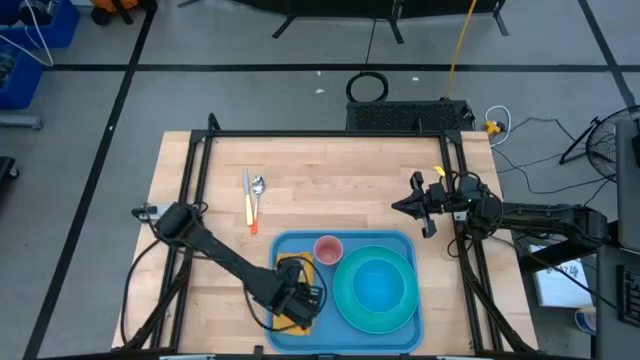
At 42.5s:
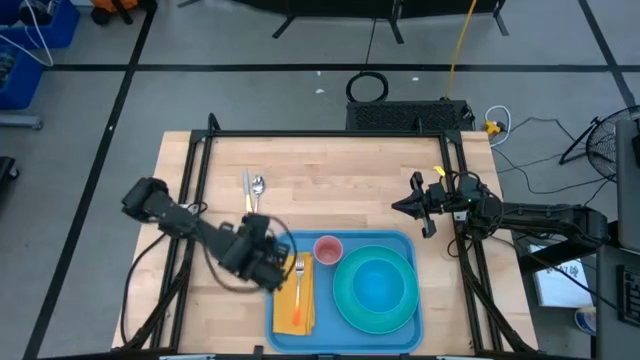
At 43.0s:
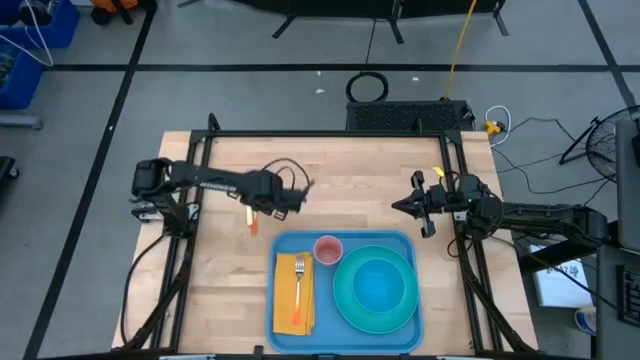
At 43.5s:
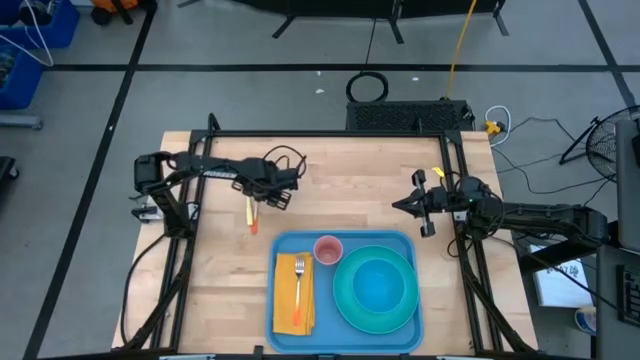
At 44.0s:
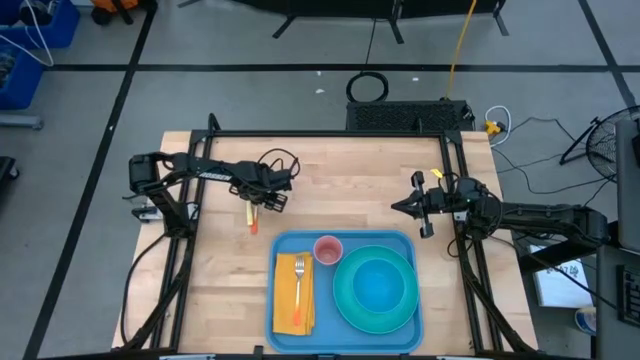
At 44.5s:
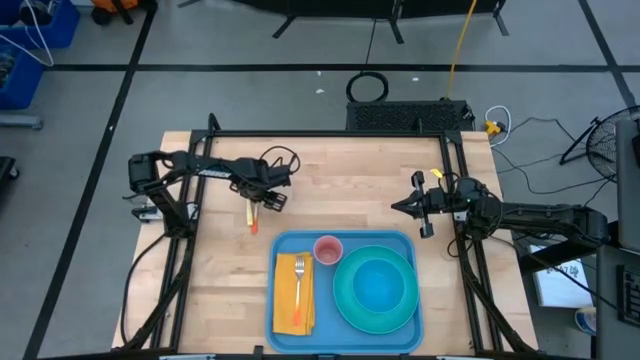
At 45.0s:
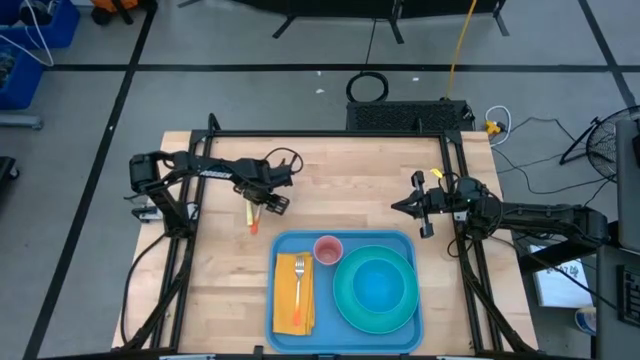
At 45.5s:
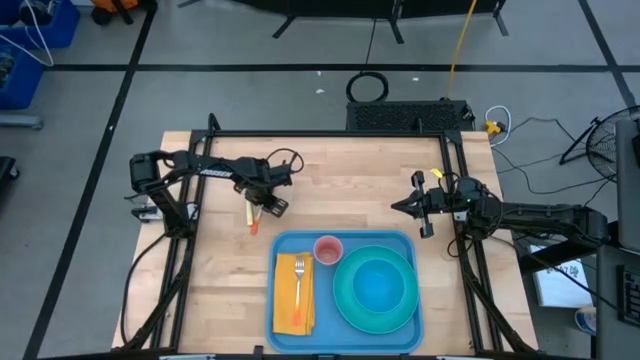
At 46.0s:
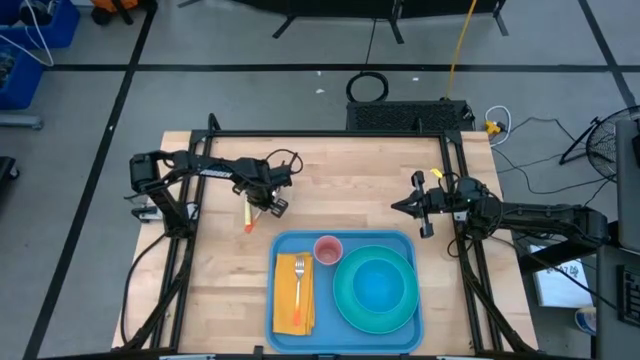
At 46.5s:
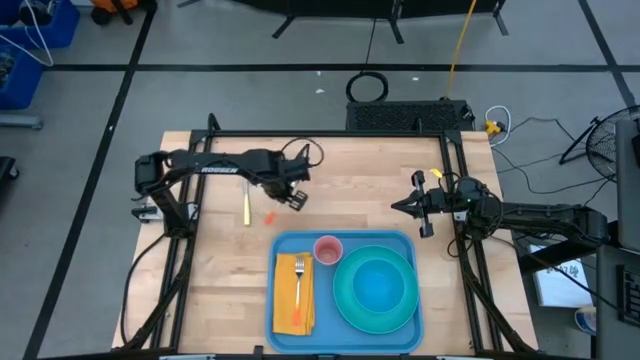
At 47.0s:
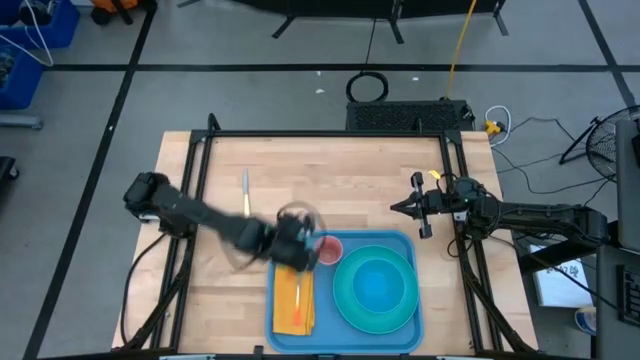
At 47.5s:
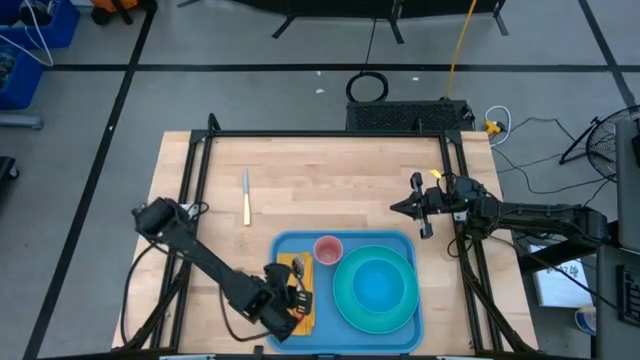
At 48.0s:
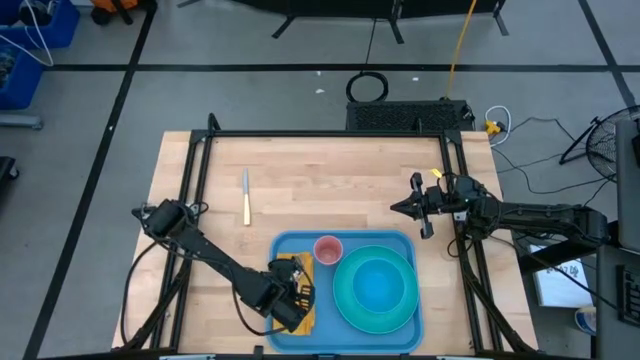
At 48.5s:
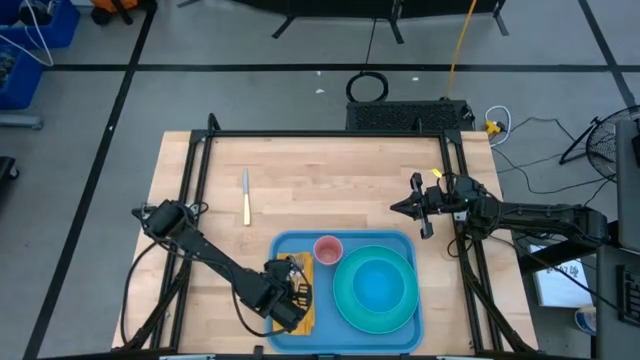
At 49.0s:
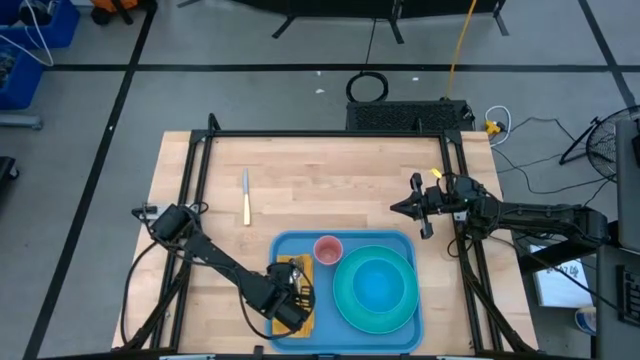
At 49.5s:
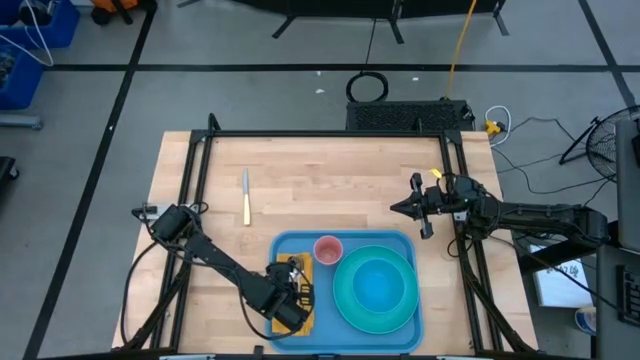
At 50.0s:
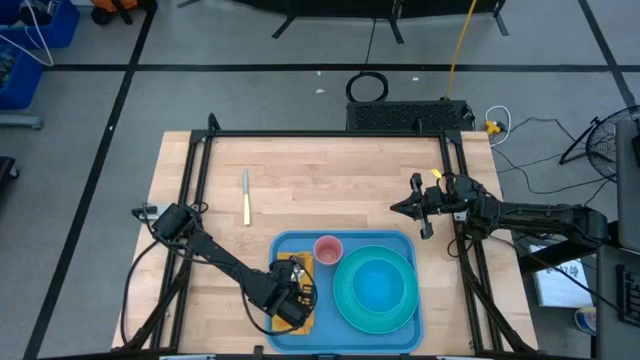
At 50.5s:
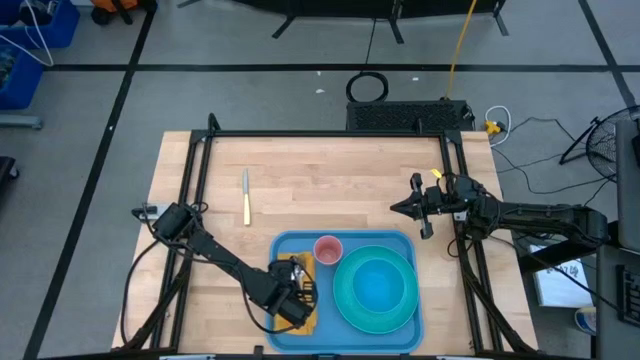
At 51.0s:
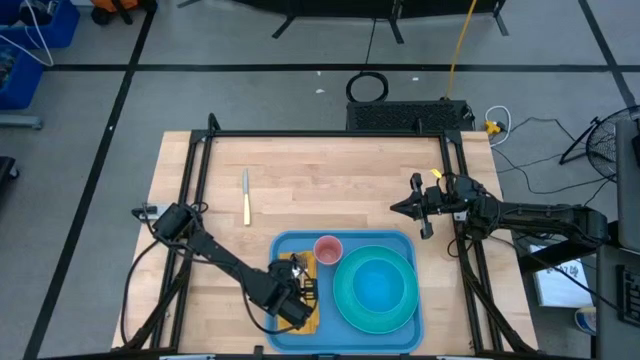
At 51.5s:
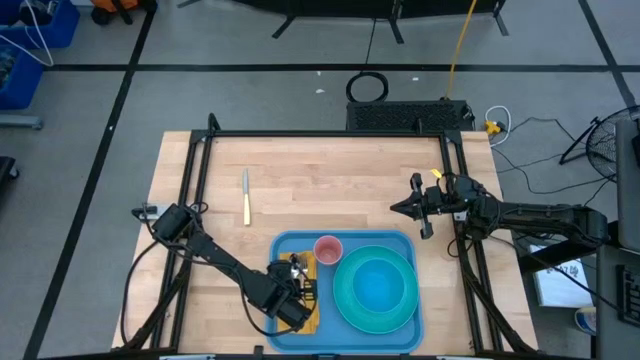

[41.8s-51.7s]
Task: Set up tray
Put the orange spoon on the yellow napkin to the left of the orange fork on the blue tray

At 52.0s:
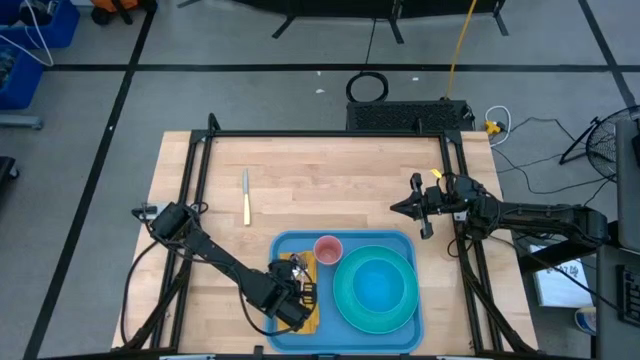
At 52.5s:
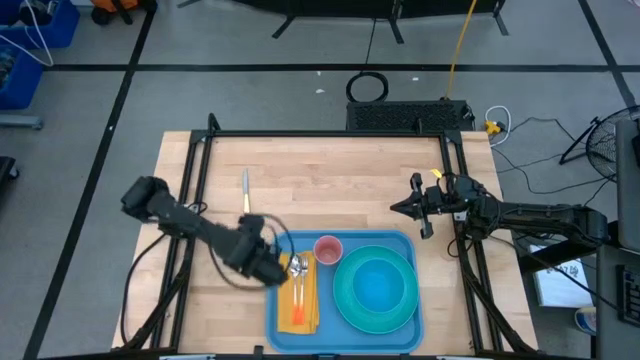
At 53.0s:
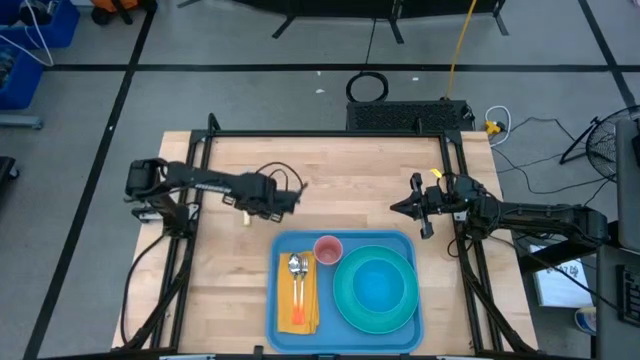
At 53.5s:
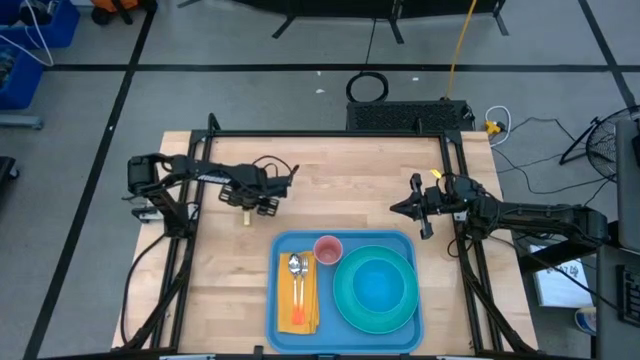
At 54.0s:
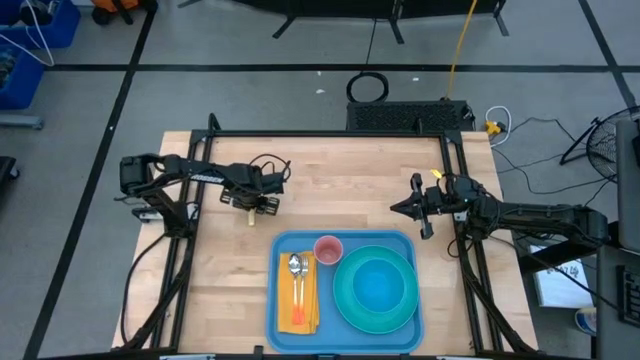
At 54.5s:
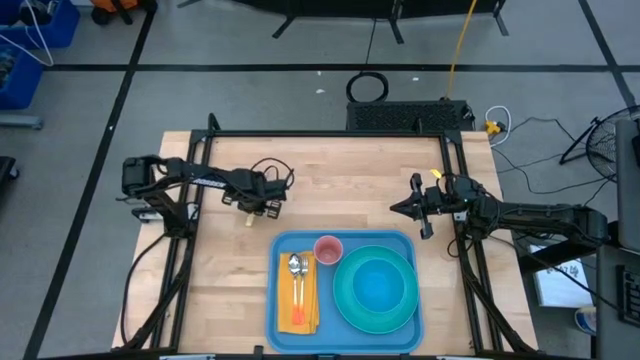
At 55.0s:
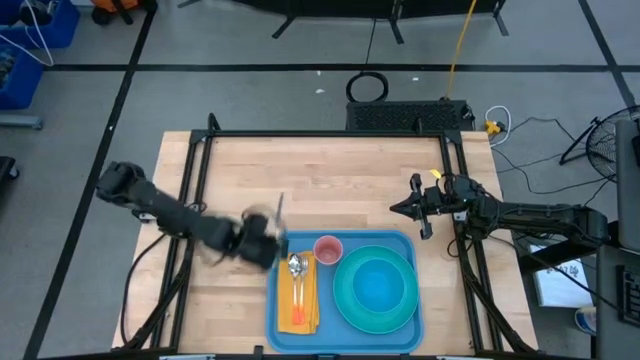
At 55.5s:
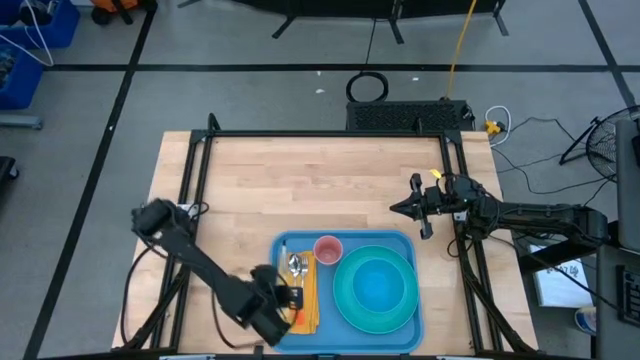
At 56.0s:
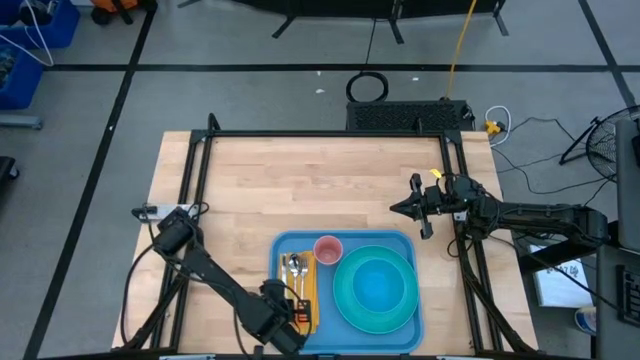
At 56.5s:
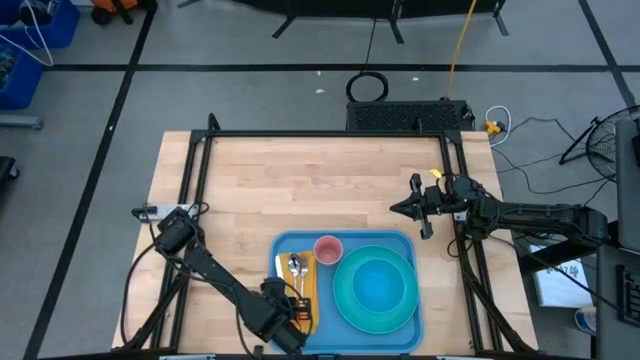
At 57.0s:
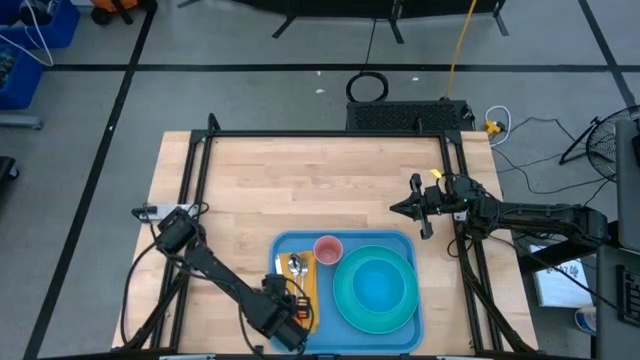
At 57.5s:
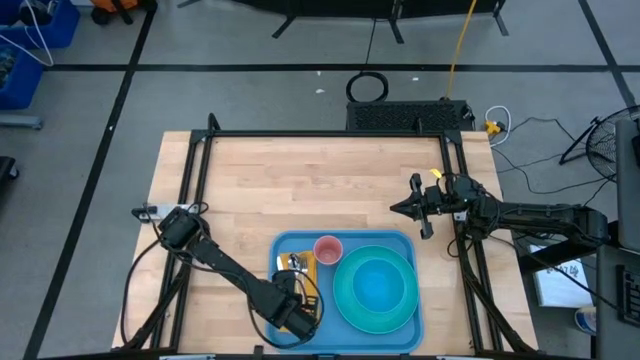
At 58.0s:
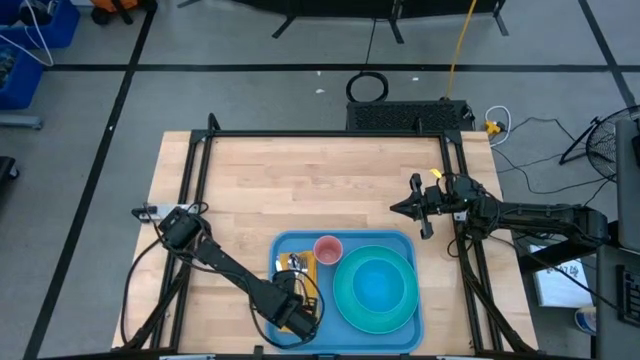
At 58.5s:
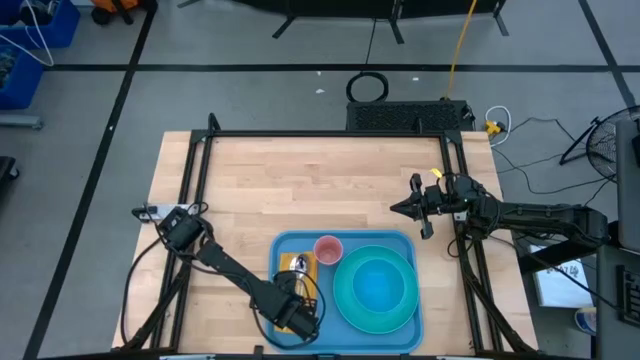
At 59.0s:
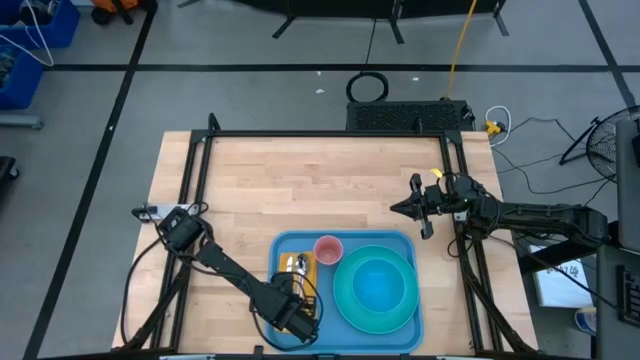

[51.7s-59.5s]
Put the yellow knife on the yellow napkin to the left side of the orange spoon on the blue tray

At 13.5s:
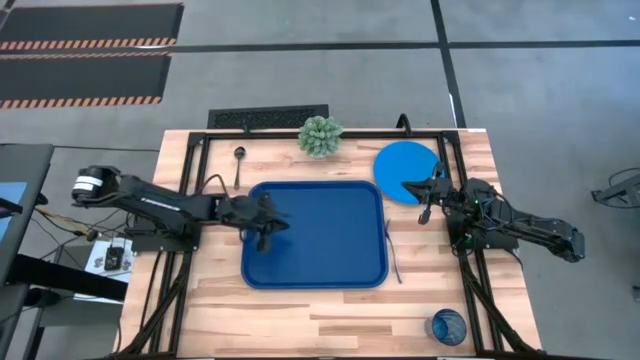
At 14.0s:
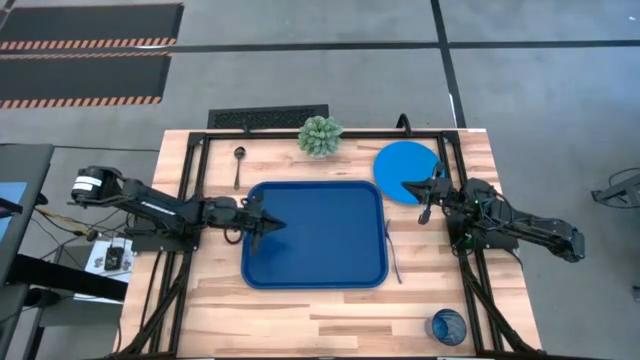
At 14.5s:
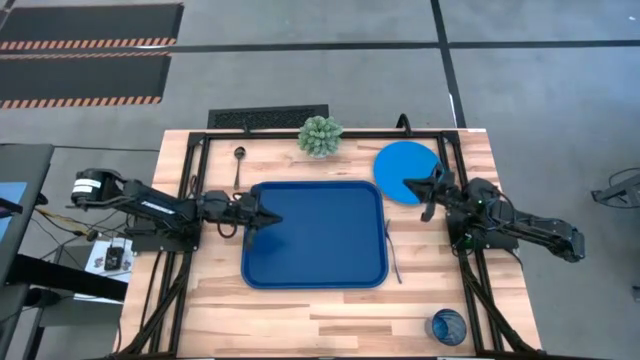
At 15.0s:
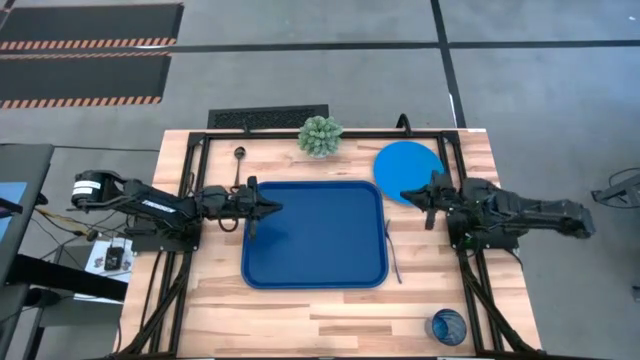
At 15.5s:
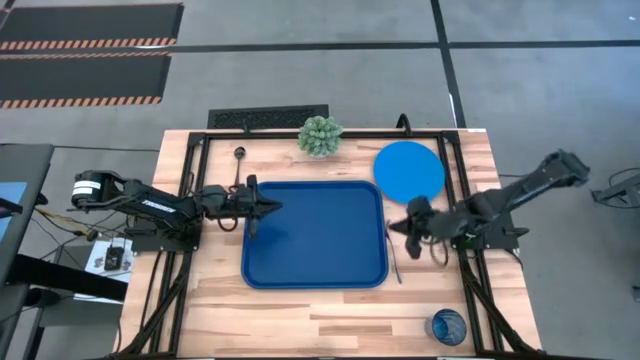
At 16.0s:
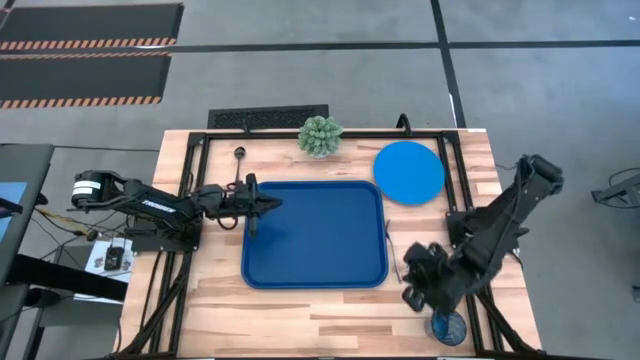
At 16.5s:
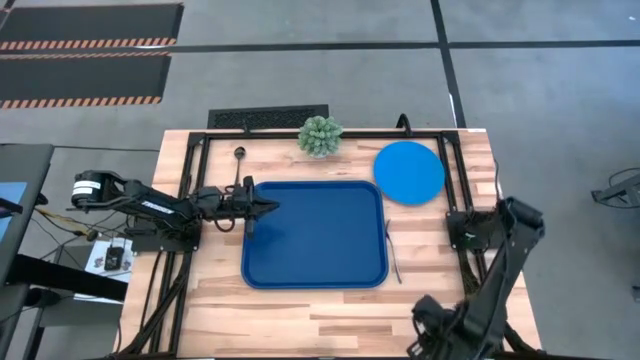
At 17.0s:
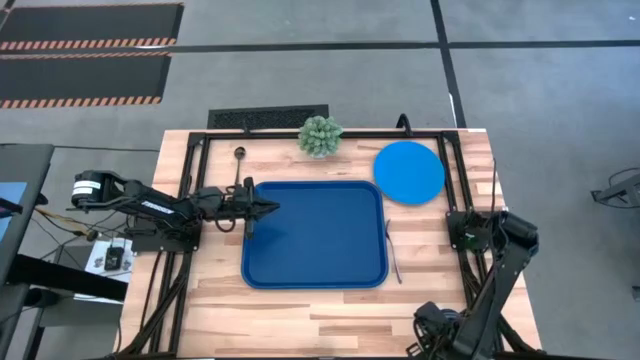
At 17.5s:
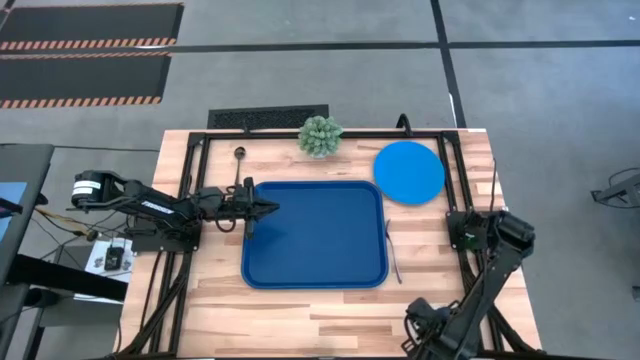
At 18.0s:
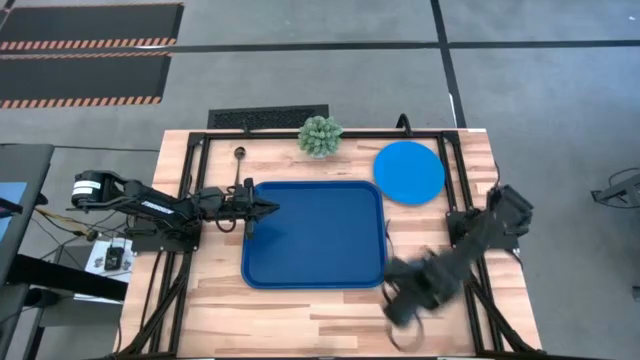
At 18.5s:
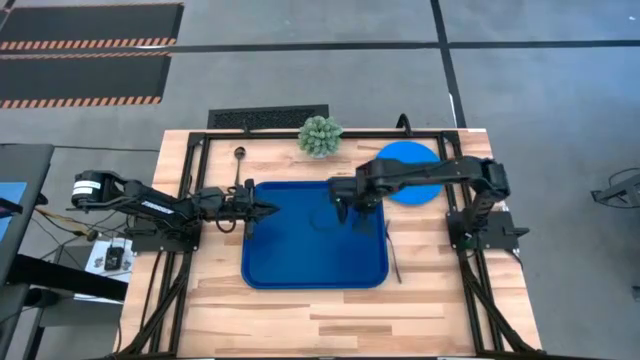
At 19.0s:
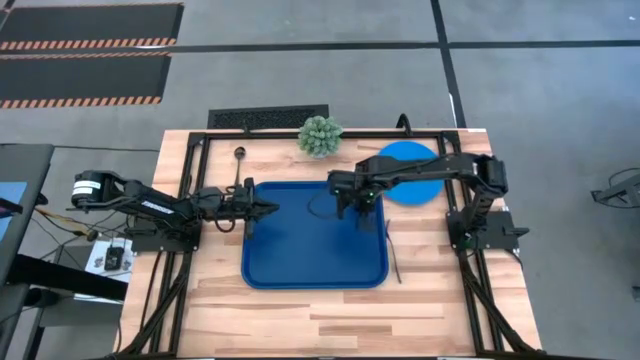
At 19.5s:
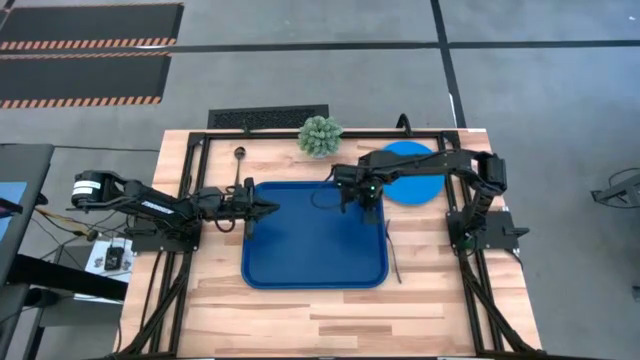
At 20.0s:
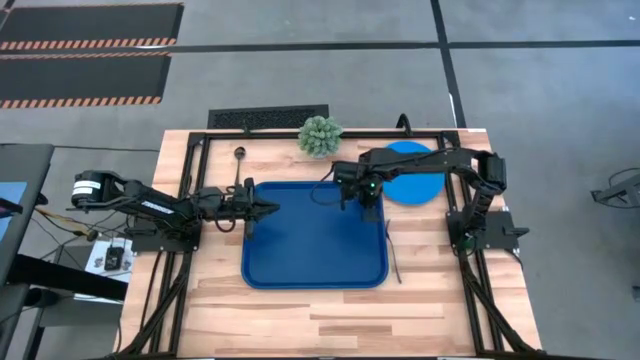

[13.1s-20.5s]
Task: Pick and place plate/cup/fork/spoon on tray
Put the blue glass on the top right of the blue serving tray
